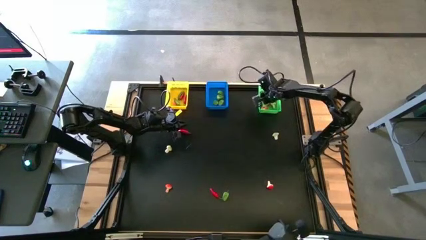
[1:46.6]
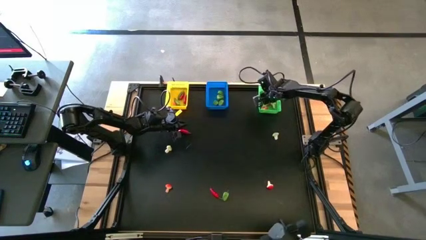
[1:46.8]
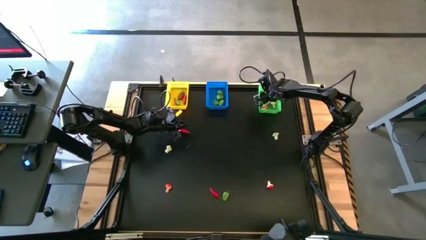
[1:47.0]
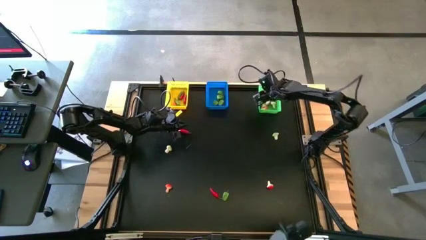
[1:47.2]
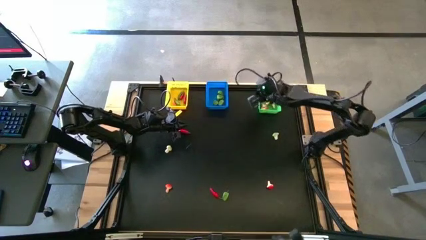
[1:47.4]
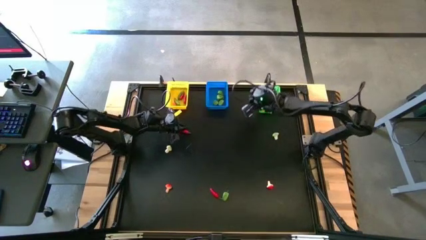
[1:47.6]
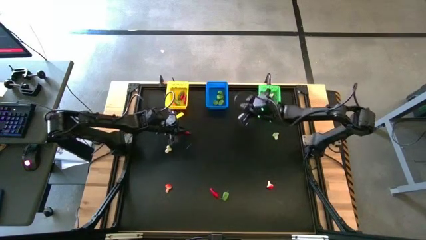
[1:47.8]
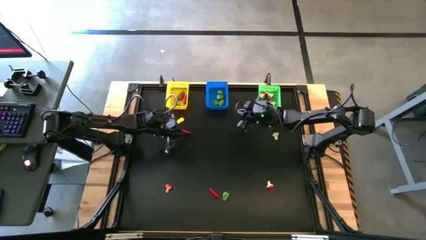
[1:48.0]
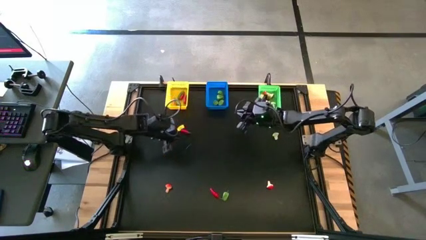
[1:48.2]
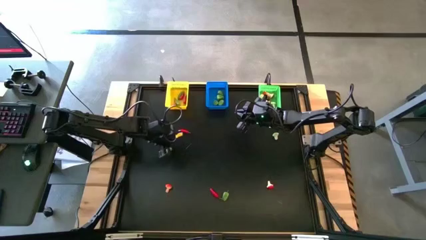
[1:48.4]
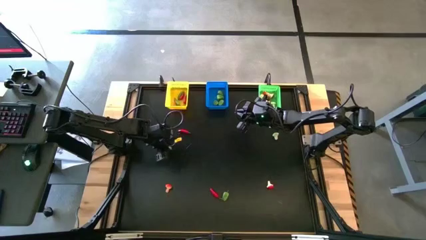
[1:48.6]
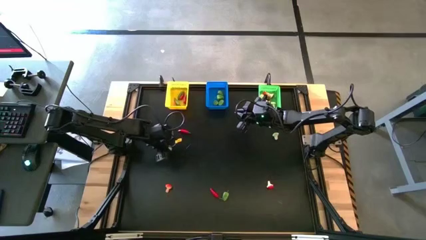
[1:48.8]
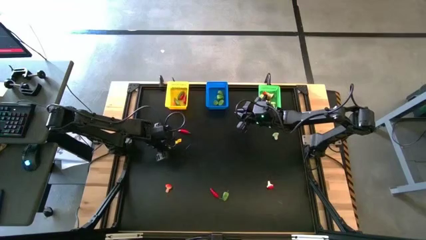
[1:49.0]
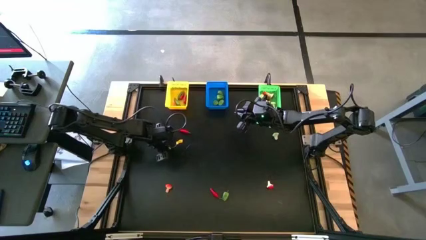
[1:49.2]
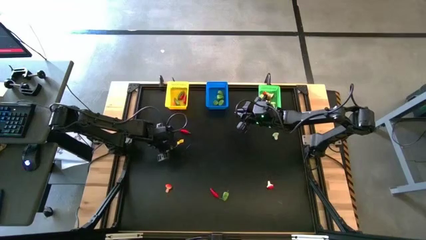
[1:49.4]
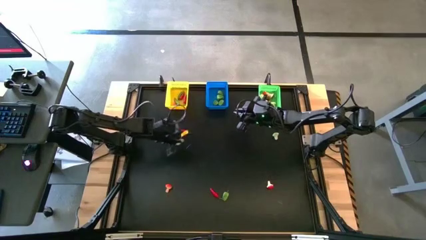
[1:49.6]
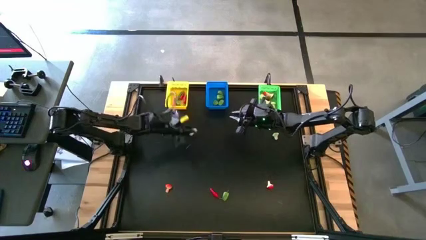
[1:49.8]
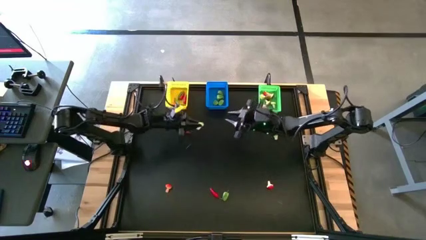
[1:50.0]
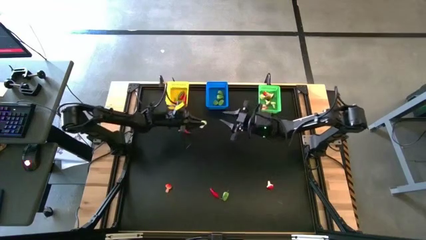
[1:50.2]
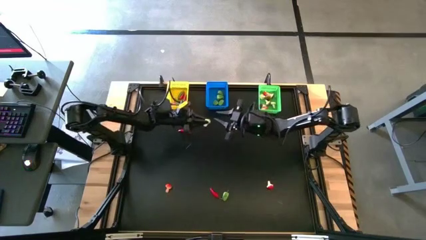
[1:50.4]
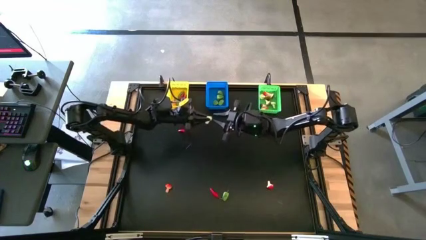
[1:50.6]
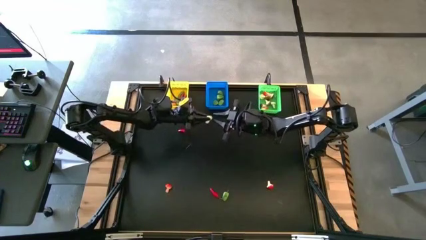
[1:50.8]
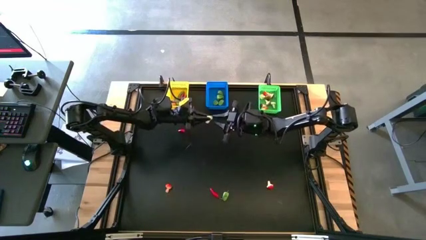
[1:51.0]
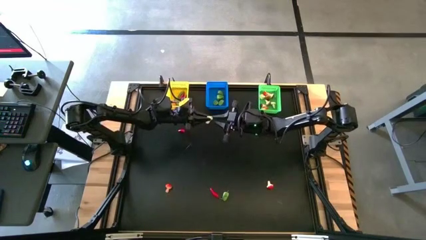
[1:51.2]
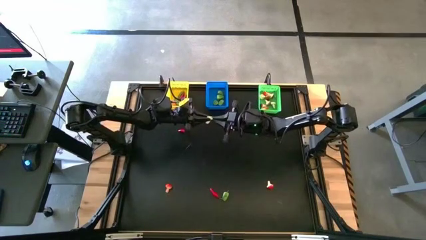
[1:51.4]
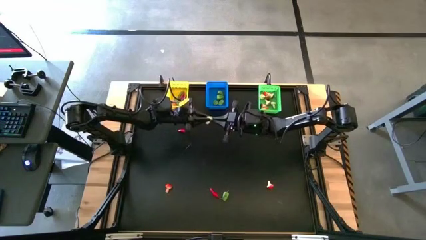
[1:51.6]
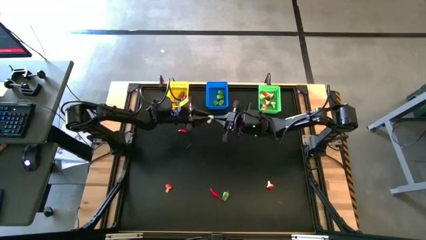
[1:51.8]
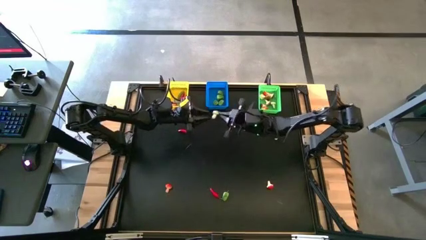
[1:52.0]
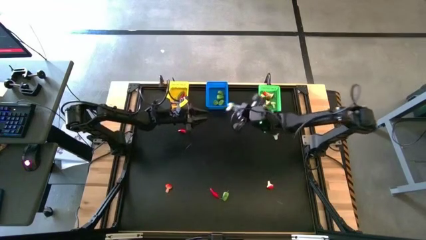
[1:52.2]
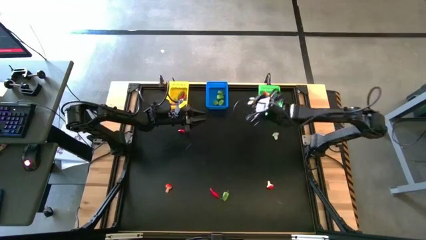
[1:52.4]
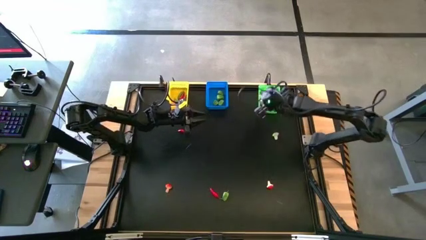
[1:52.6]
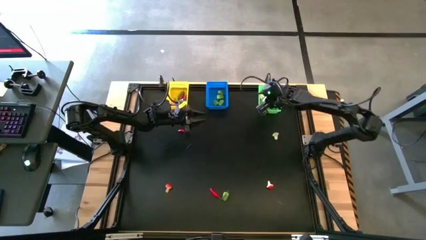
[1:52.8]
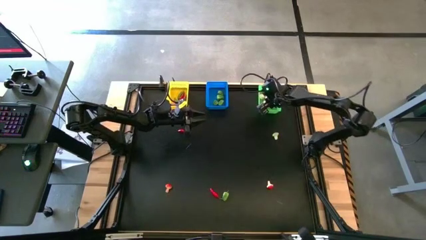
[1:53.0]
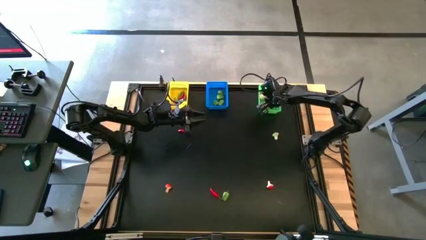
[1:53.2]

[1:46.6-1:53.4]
Task: Sort produce into baskets
Put the green mushroom into the green bin

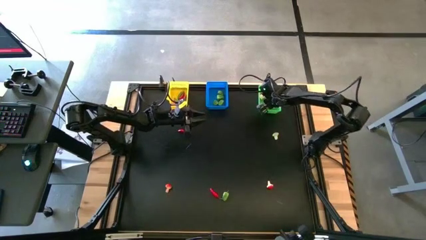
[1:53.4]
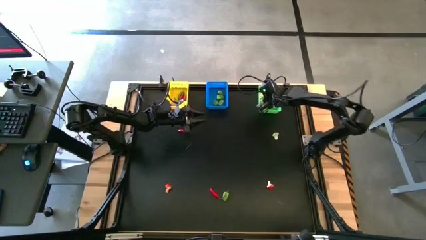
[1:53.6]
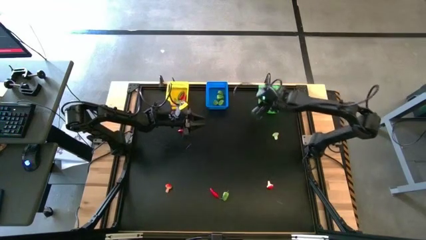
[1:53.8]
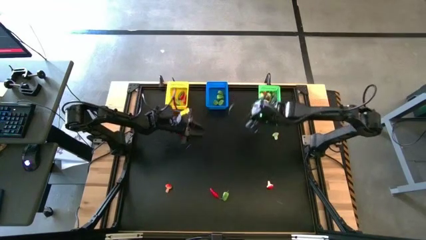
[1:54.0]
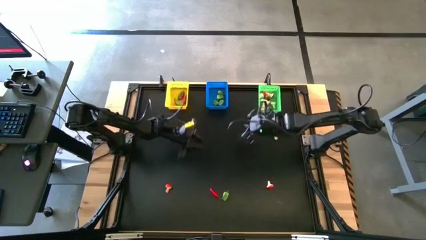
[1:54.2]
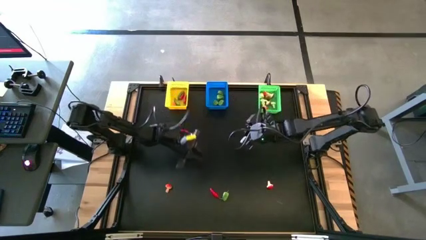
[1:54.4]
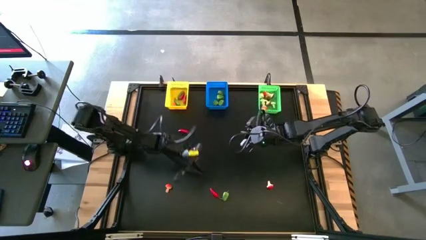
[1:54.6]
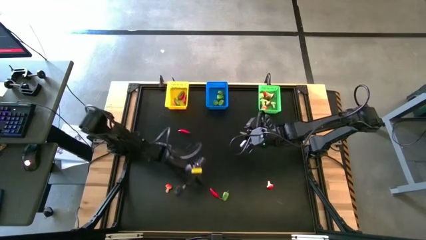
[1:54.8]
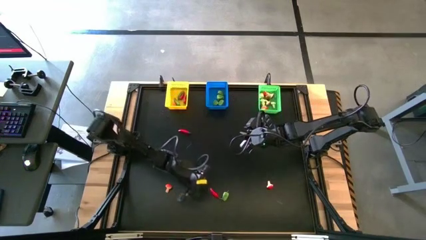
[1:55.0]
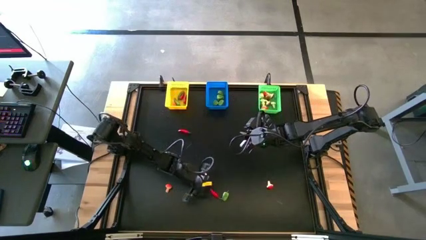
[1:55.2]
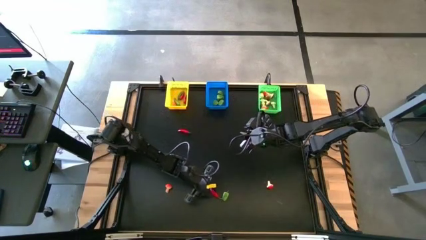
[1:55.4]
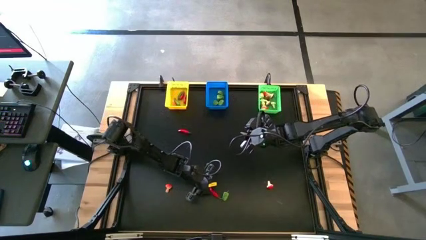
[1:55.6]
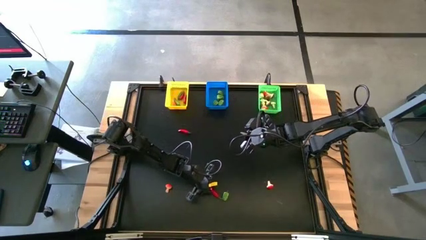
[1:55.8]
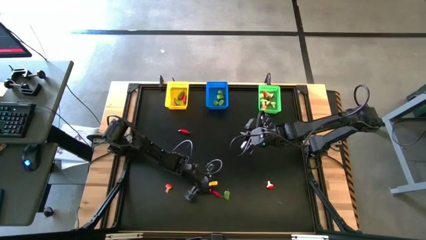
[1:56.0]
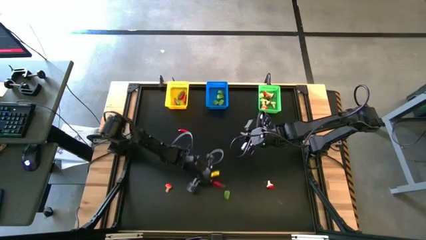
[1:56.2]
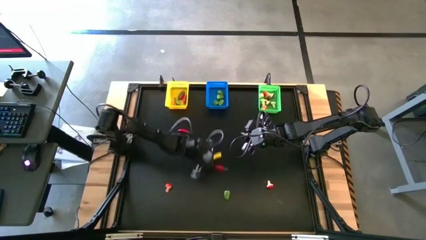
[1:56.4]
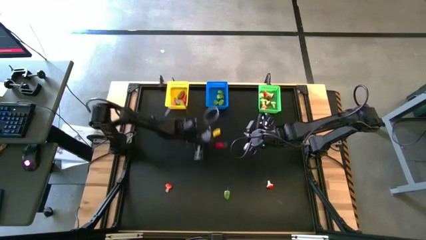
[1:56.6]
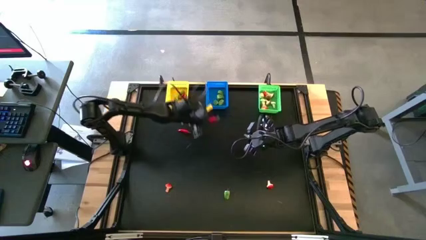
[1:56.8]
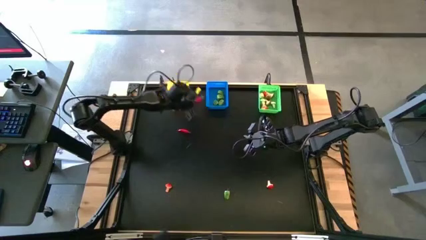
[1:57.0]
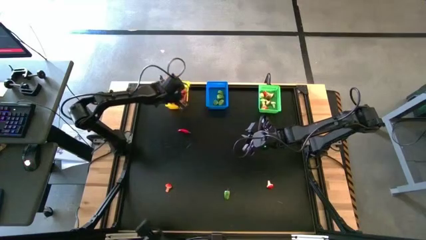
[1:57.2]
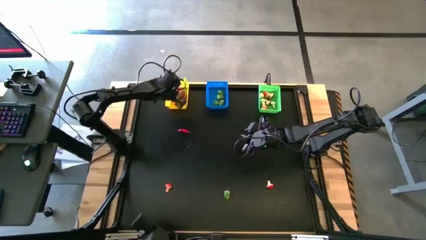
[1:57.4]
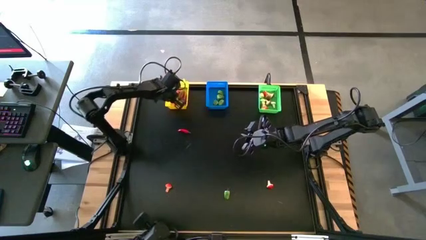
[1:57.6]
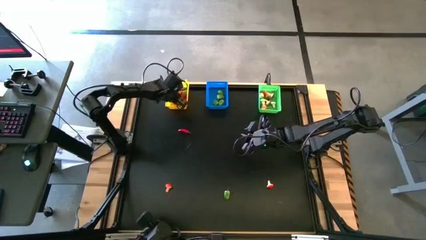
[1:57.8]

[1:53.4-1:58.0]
Put the red chili pepper into the yellow bin

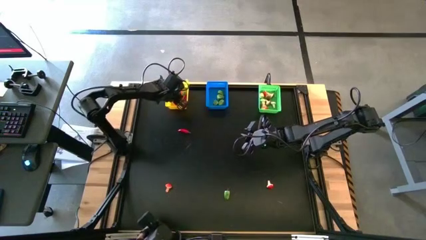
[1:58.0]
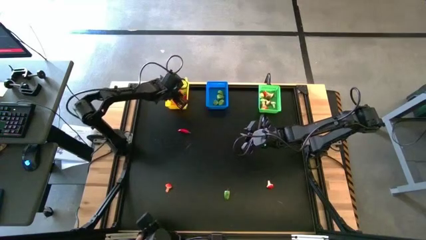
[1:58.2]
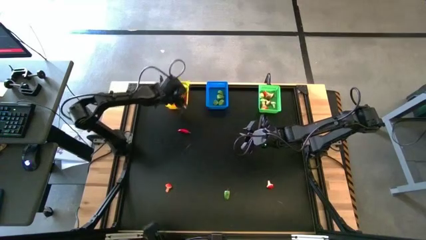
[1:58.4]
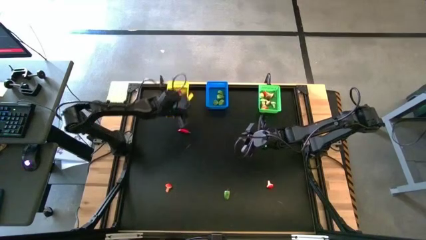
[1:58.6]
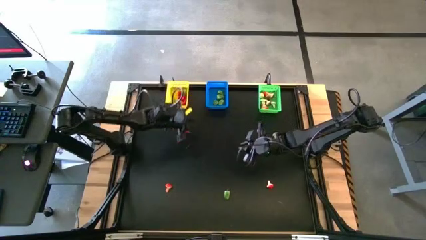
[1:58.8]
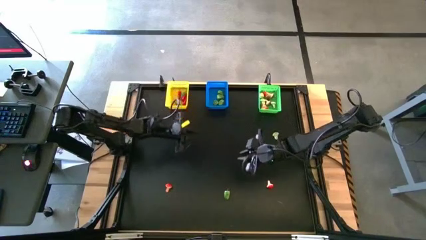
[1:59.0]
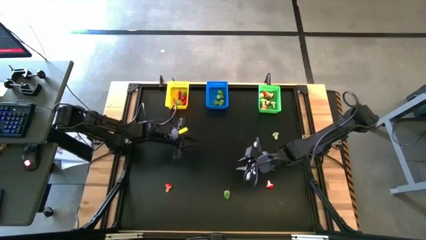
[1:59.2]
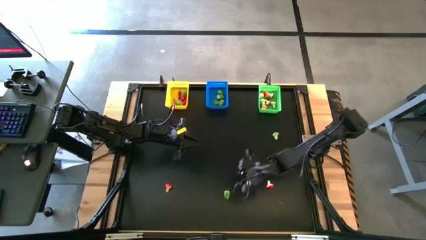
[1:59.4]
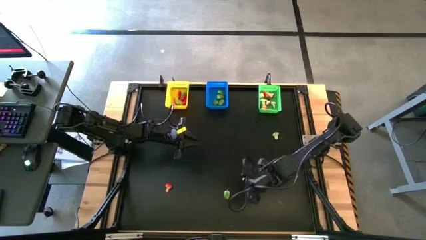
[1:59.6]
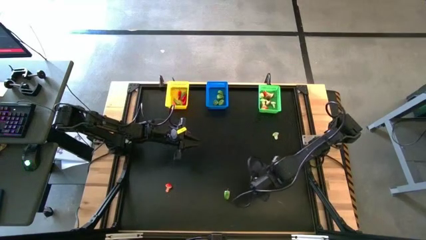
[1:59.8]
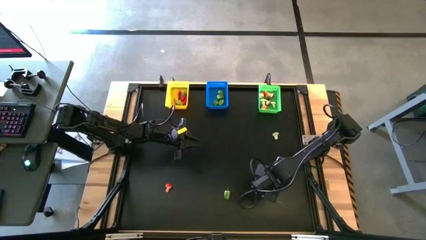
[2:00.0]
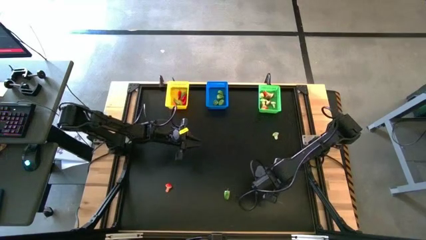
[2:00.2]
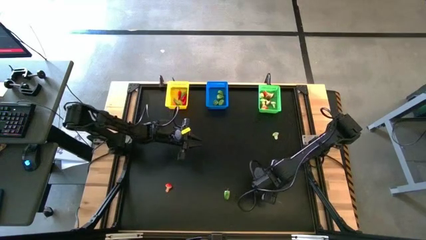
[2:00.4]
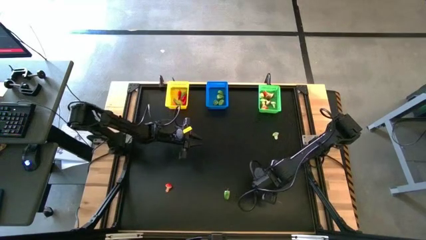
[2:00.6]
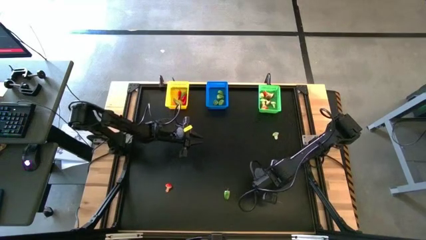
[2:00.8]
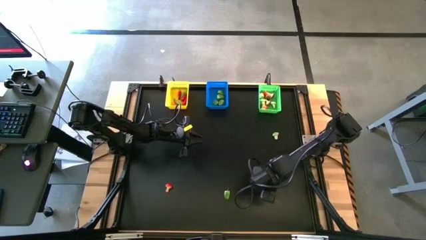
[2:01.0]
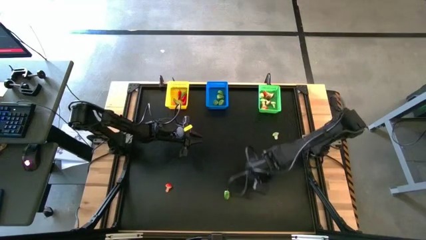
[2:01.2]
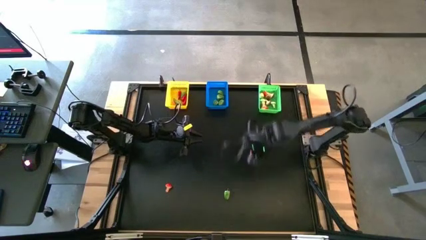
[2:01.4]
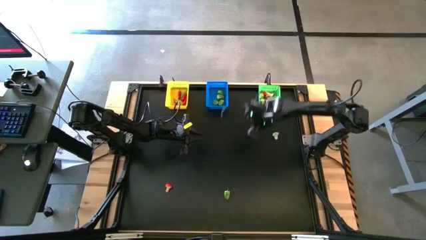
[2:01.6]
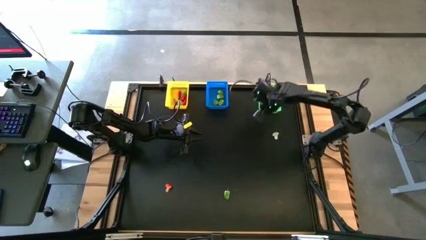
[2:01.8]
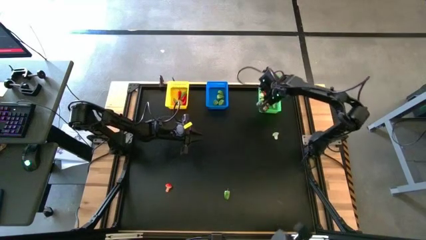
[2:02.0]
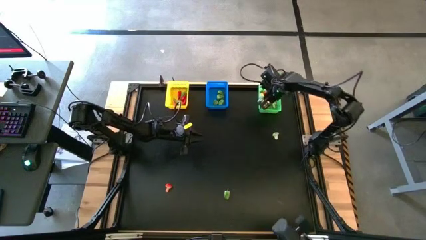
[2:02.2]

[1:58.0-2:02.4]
Put the orange mushroom into the green bin

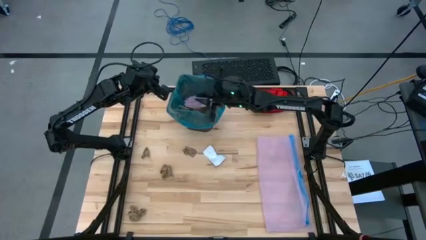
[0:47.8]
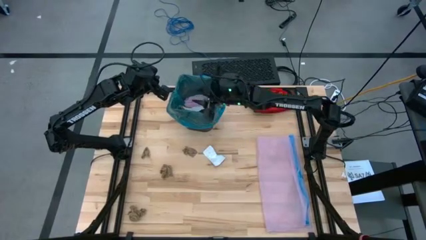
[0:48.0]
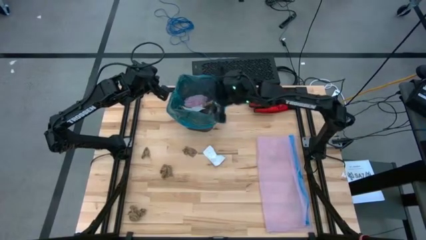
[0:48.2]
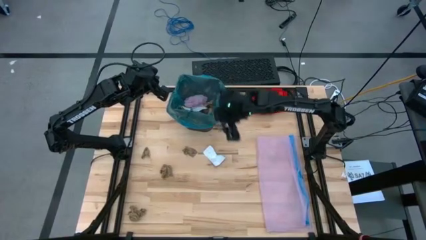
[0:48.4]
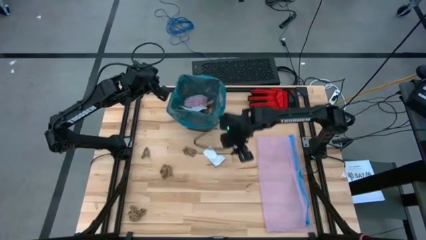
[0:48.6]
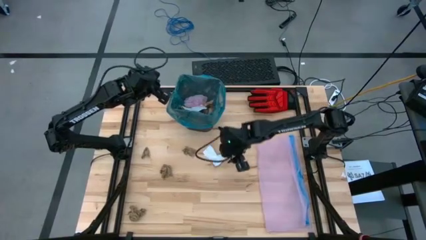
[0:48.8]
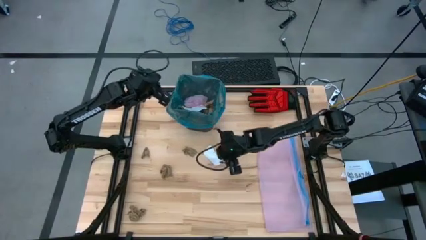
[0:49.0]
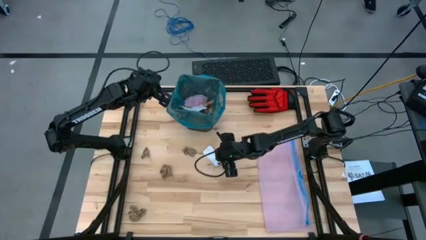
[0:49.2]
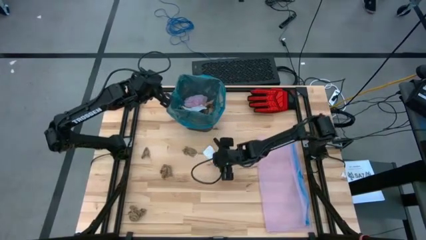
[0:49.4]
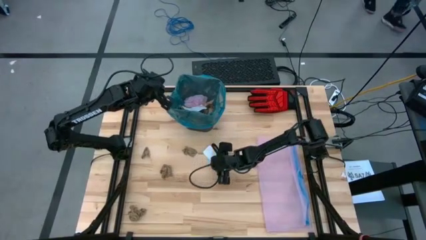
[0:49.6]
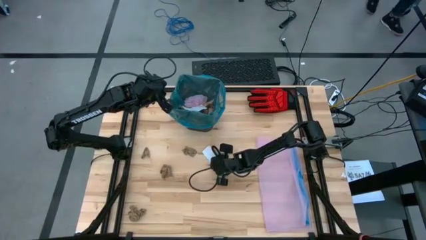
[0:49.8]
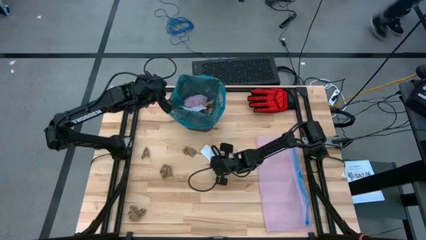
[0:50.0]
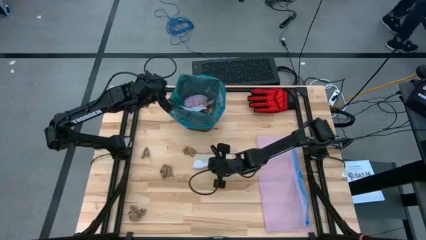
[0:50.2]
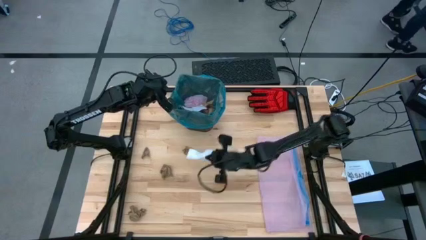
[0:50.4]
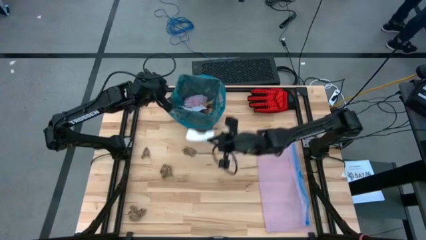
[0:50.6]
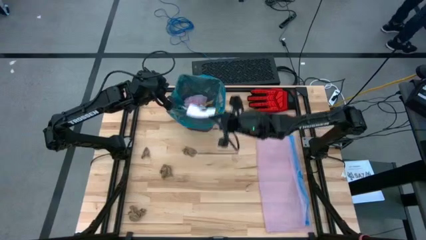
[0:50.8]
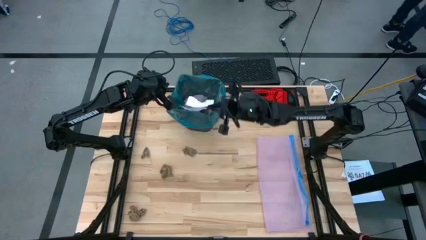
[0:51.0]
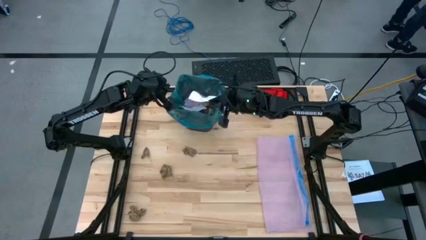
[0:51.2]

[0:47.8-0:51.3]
Task: place trash/remove bag and relplace
Put the white paper into the trash bin
